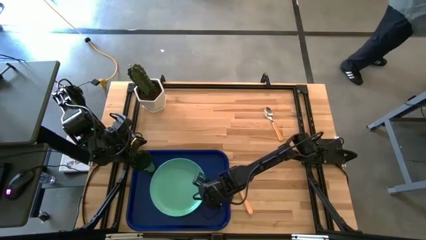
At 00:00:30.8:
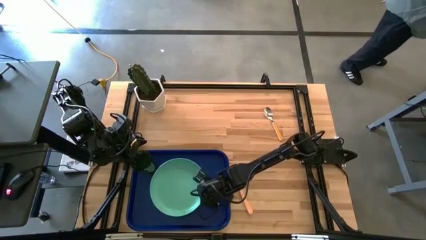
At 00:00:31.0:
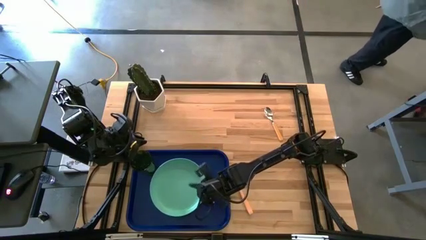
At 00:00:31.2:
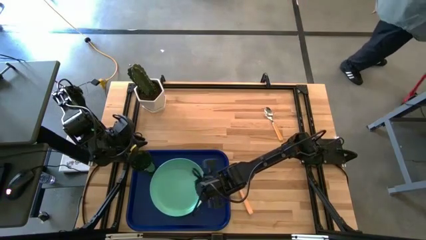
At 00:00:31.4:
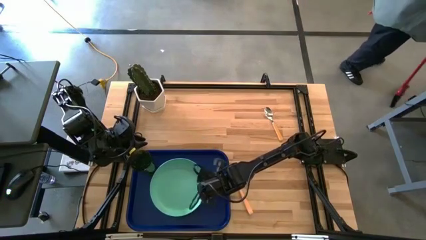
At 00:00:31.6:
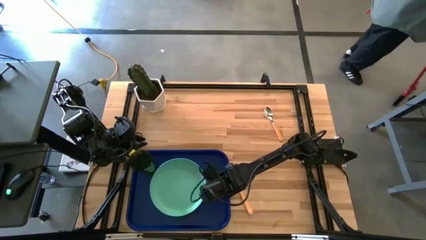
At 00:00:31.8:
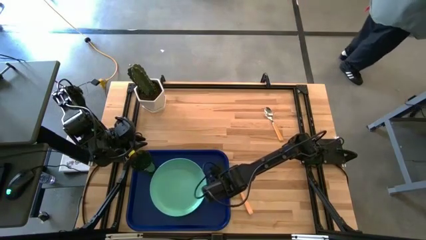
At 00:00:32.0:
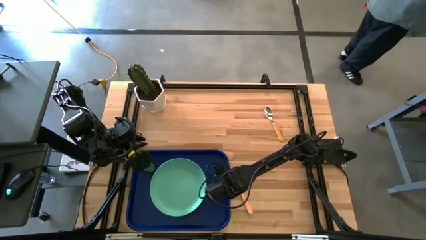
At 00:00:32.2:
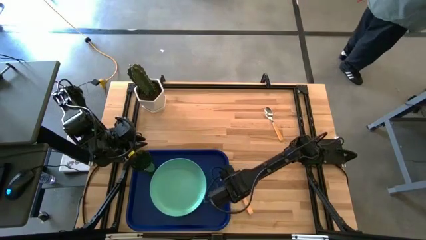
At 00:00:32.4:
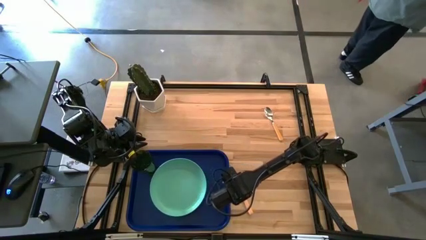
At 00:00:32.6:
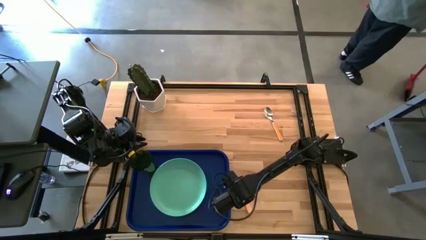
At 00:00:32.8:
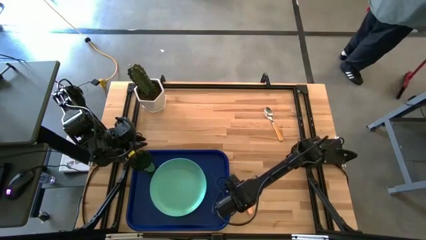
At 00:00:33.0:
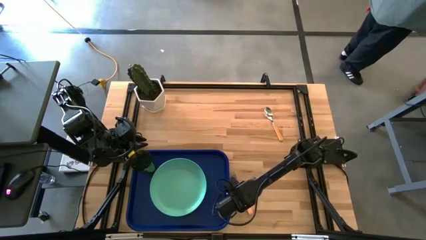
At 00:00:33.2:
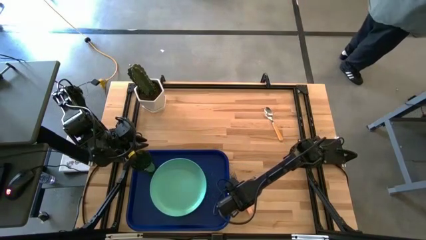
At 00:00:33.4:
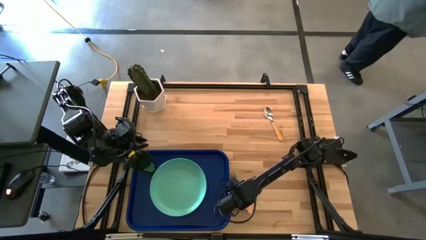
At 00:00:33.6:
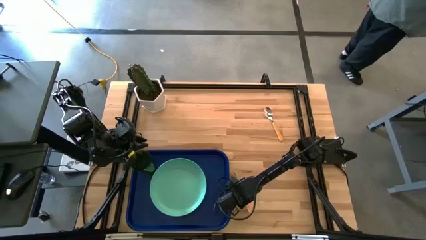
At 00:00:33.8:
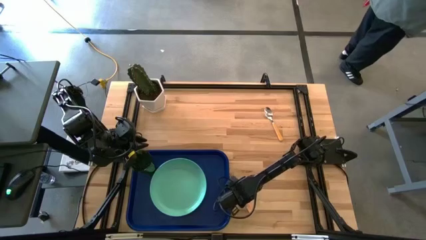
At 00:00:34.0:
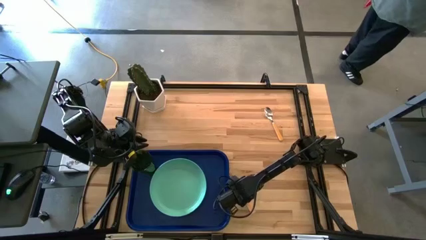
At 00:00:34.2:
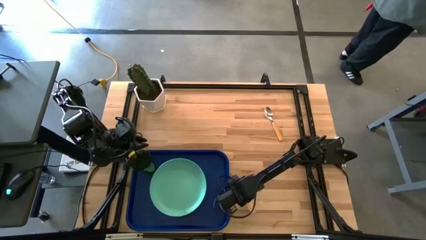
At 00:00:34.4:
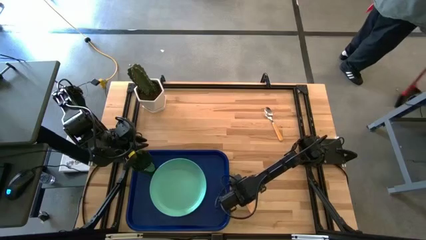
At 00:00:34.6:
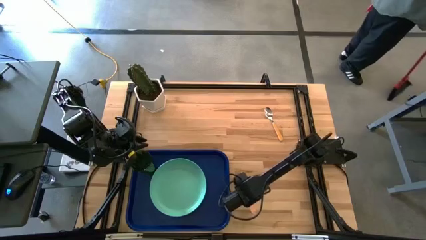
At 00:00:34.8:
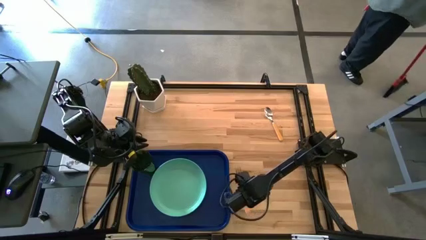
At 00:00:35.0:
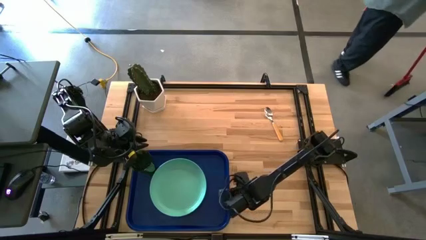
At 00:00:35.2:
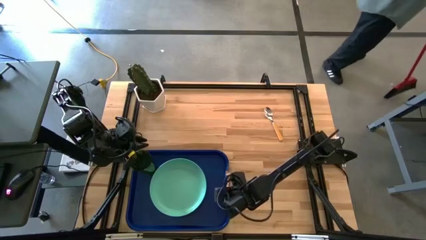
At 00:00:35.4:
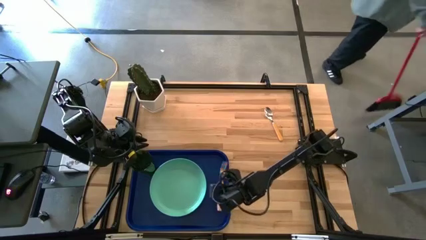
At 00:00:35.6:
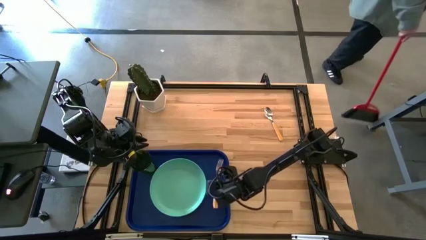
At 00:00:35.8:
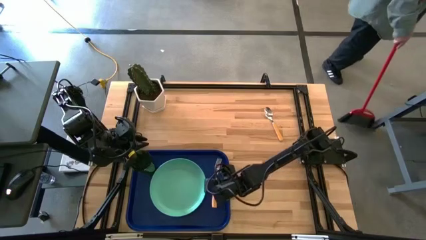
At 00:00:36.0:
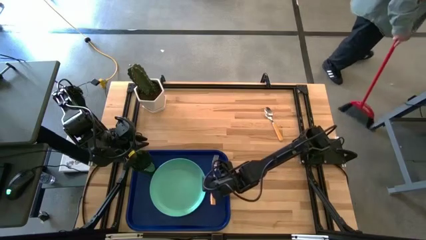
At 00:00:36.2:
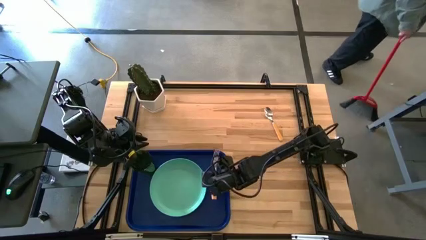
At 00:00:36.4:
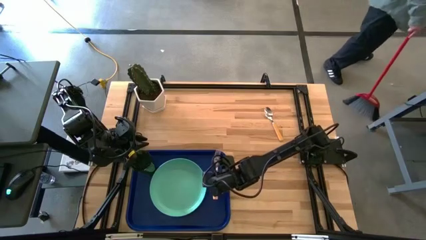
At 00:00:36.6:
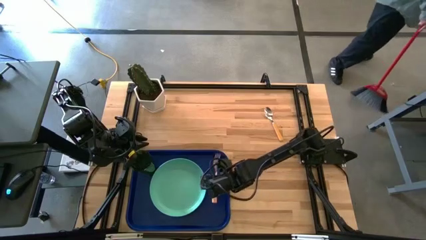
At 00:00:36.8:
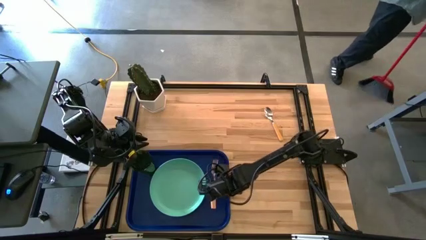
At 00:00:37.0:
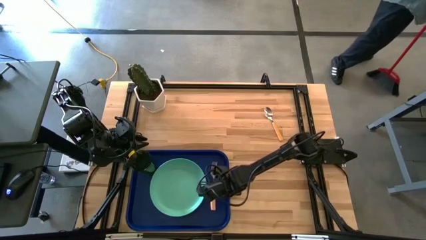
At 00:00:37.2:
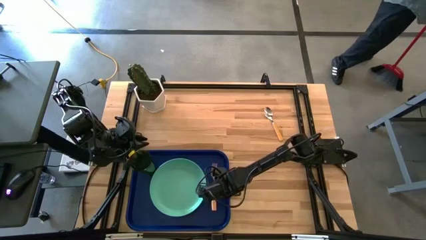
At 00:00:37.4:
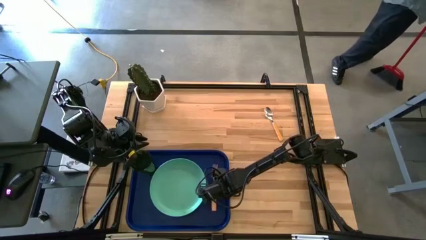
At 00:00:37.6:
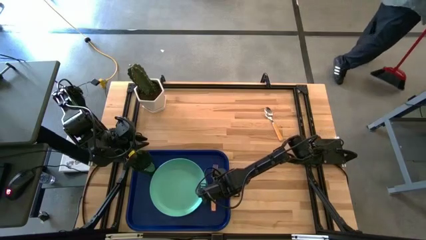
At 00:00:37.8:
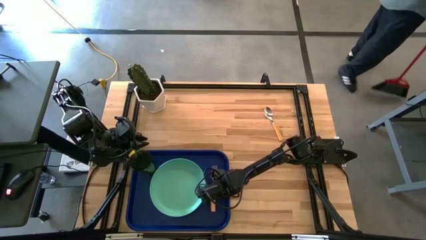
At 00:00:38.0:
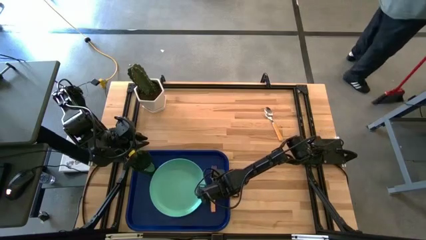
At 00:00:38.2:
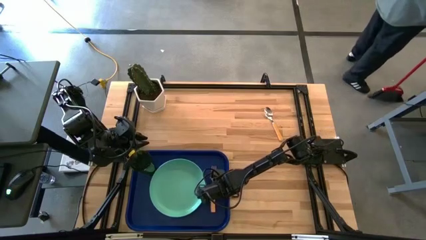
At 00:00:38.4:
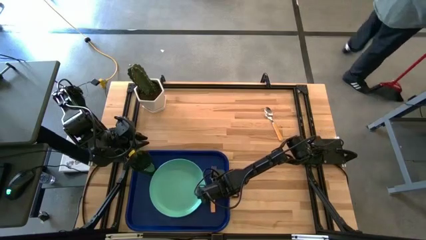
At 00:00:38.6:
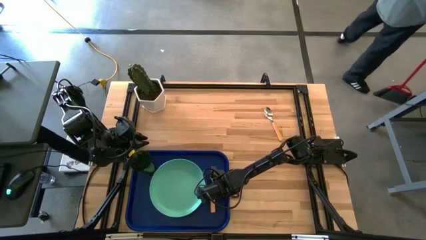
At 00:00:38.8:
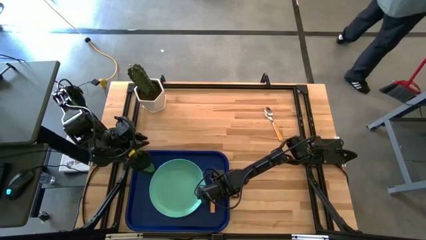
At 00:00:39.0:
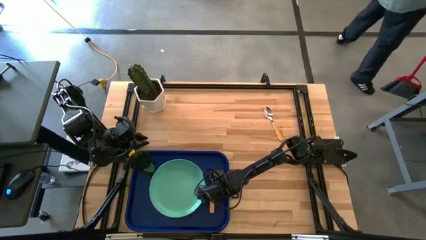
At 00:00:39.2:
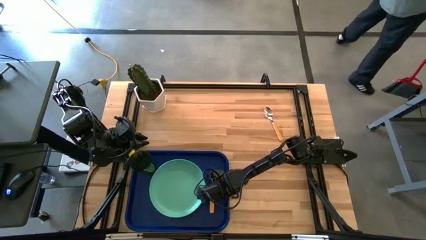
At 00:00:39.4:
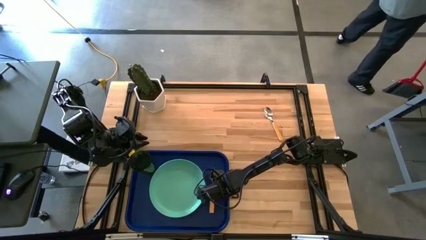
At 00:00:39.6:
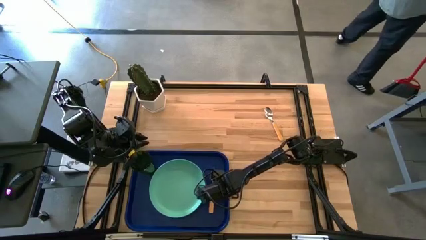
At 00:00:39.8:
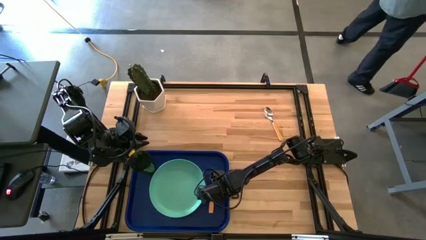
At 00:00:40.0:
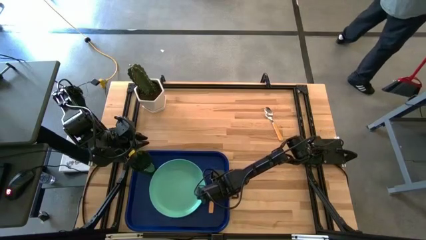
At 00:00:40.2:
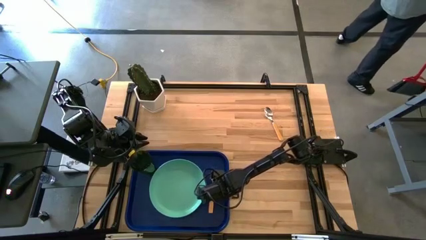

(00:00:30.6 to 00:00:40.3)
Task: Pick and place plate/cup/fork/spoon on tray
Put the yellow fork on the blue tray to the right of the green plate

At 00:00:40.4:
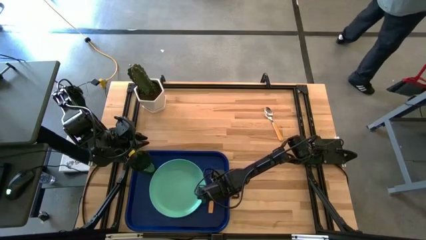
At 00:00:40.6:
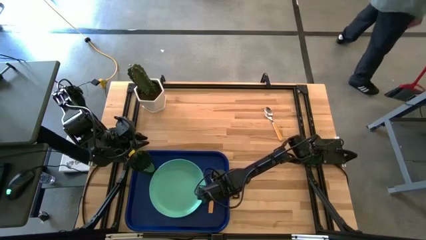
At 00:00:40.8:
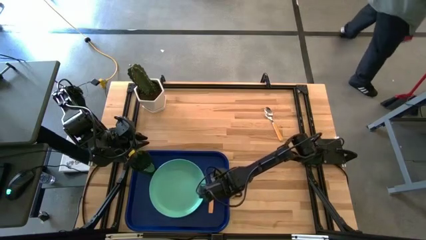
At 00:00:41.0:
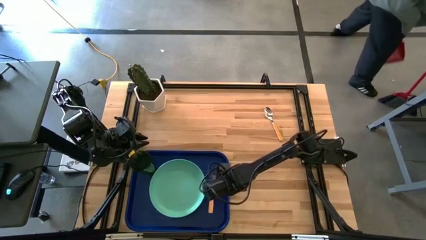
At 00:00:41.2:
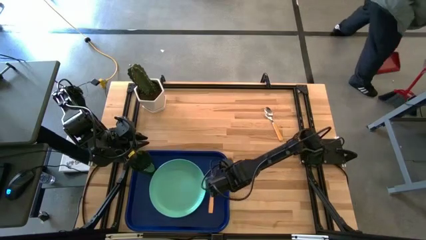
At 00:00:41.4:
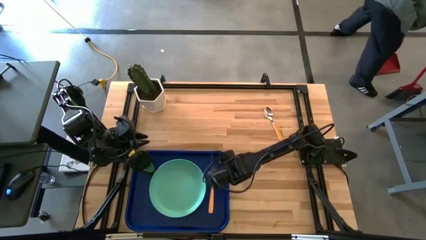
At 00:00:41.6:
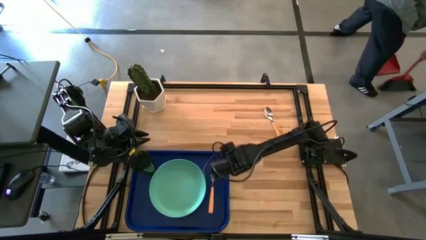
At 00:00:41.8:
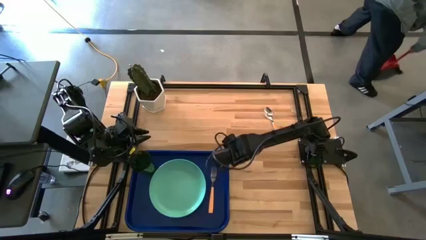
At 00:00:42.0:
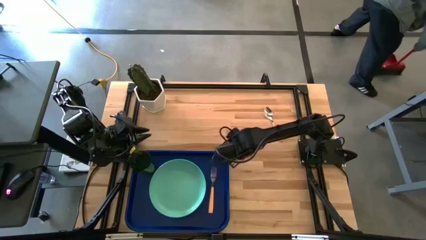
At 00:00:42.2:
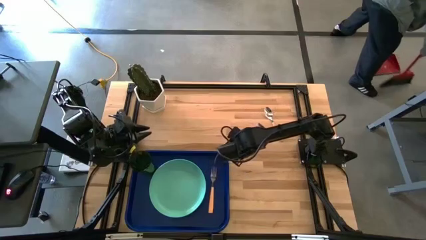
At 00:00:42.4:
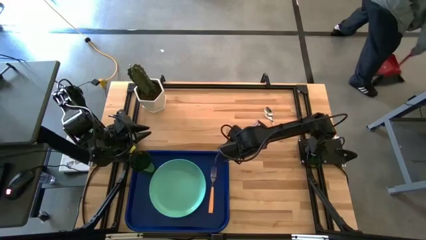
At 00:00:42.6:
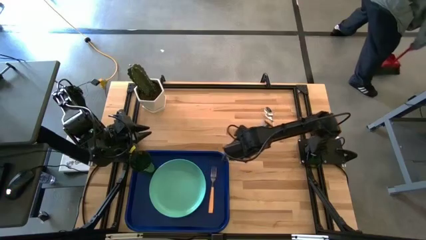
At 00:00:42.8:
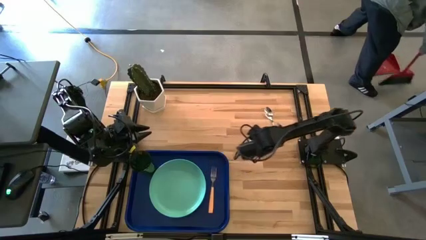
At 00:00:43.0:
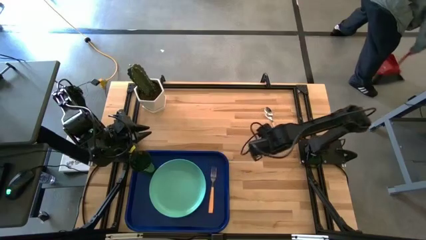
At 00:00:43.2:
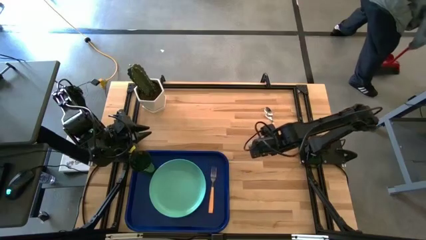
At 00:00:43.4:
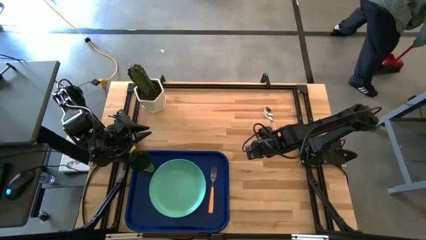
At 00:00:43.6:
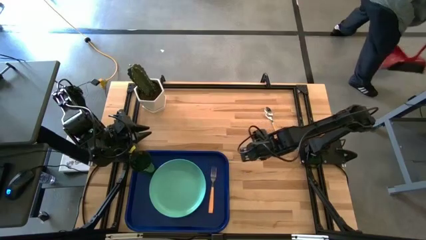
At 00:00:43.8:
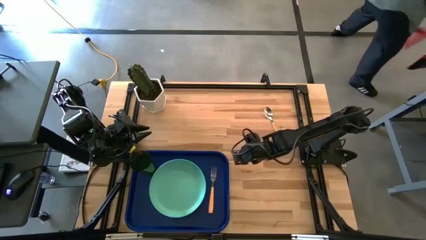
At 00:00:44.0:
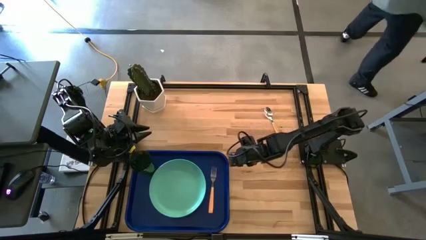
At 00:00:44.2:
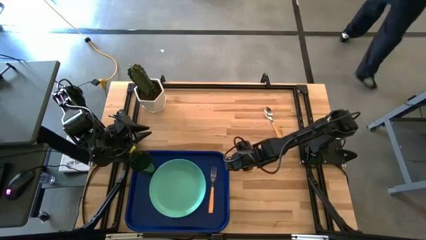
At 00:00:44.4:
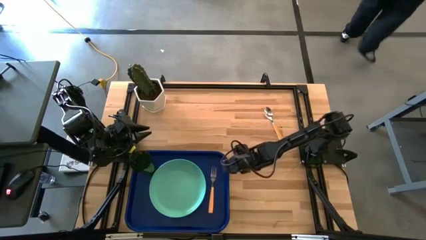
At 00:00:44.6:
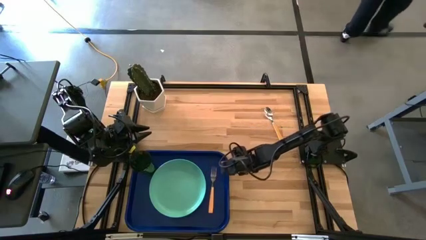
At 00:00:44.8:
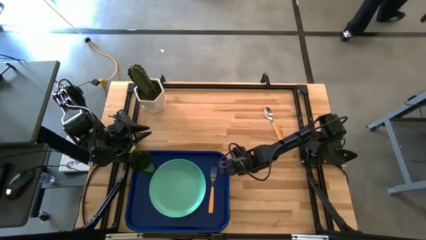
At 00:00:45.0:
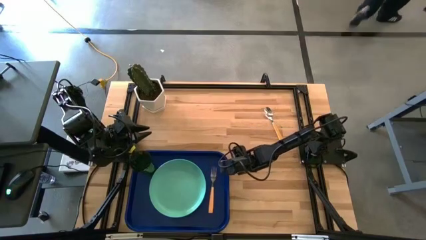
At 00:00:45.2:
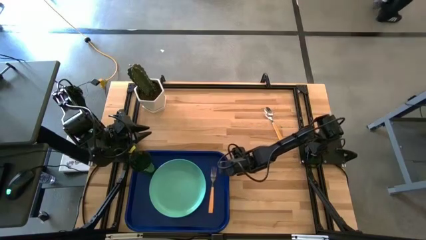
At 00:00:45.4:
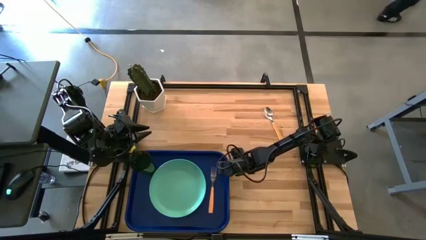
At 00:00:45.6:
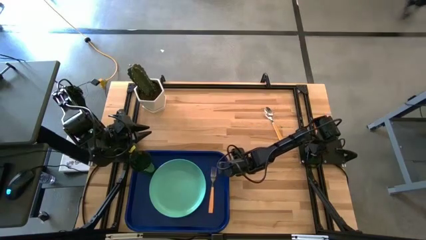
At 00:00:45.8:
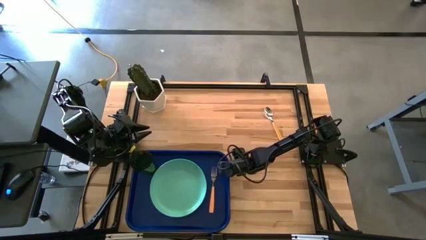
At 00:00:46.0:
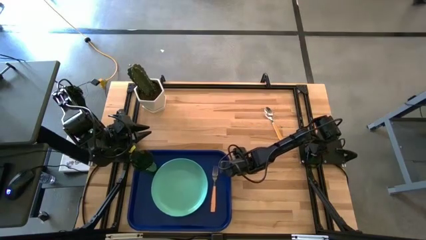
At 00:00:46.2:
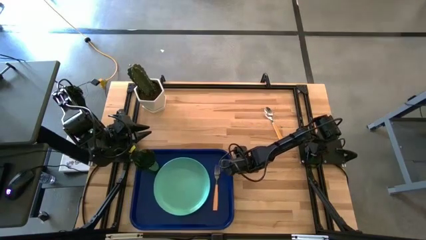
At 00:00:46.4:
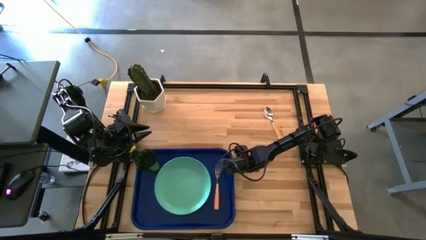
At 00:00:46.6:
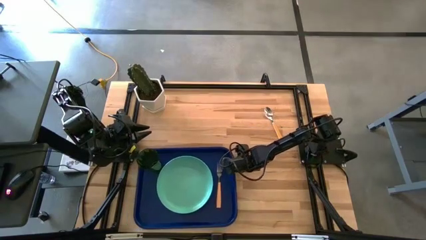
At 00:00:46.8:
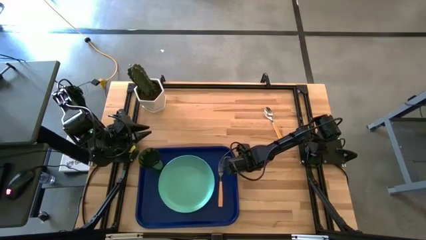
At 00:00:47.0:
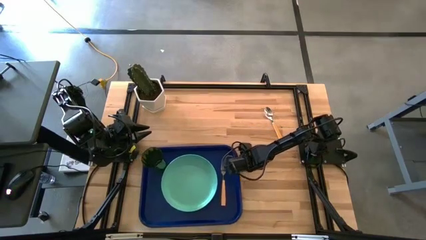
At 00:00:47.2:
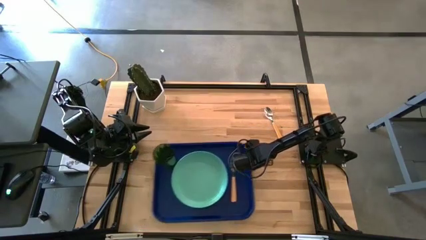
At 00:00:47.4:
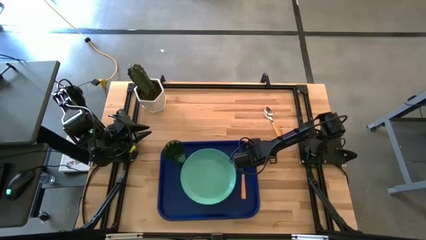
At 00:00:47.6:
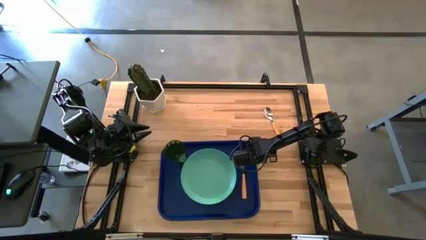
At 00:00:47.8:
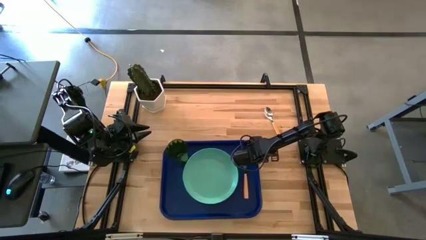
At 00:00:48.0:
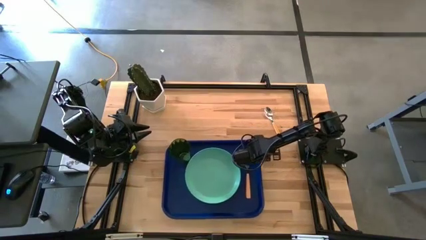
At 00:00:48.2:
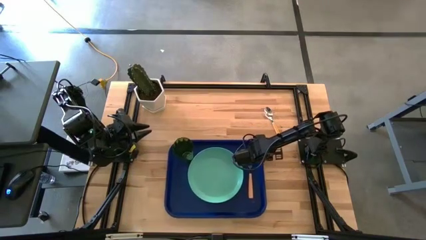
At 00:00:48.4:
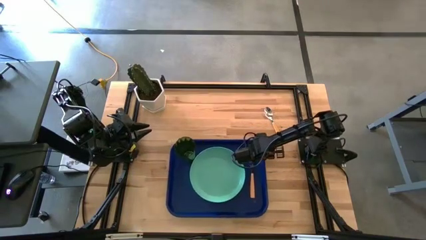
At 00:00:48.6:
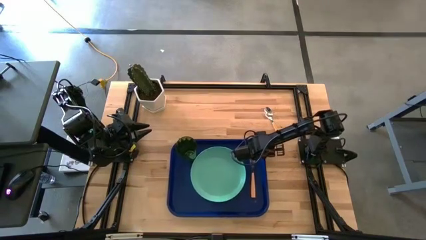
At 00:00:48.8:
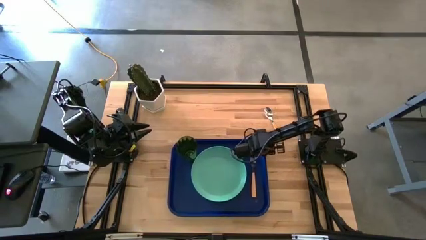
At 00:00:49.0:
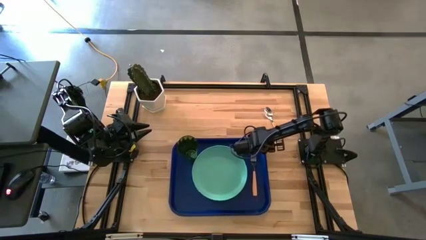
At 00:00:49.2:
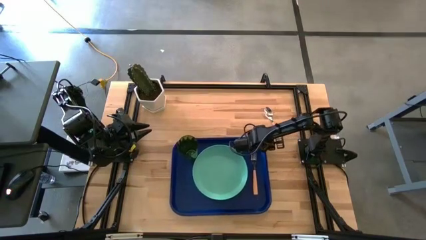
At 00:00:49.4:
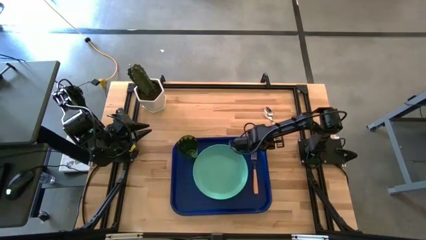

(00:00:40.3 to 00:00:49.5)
Move the blue tray to the center of the table
